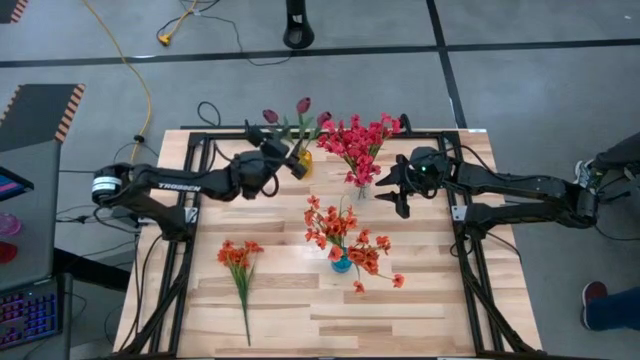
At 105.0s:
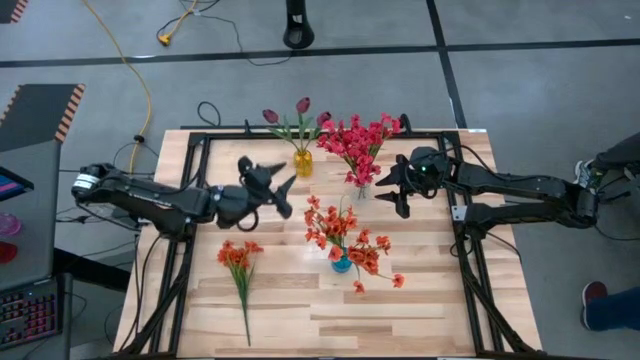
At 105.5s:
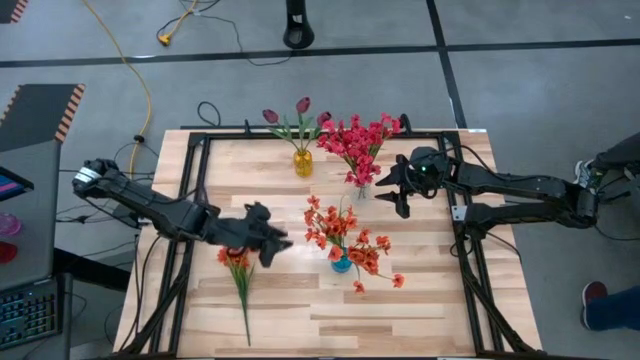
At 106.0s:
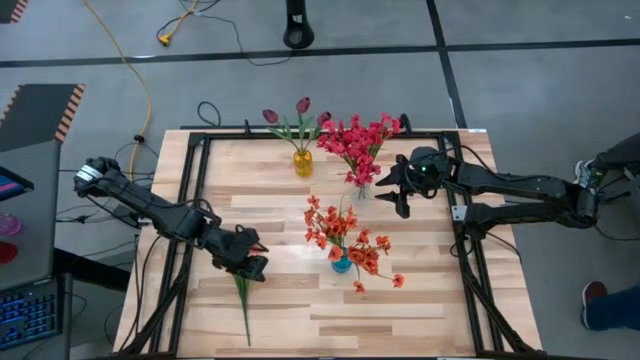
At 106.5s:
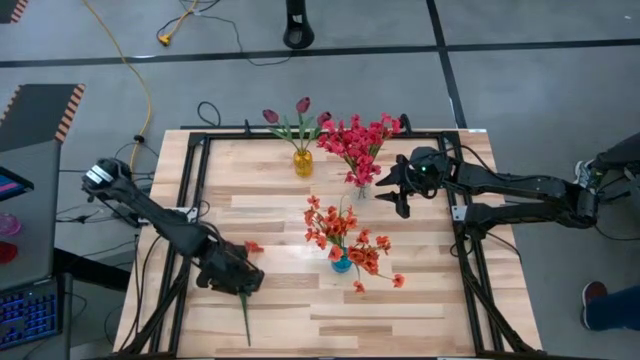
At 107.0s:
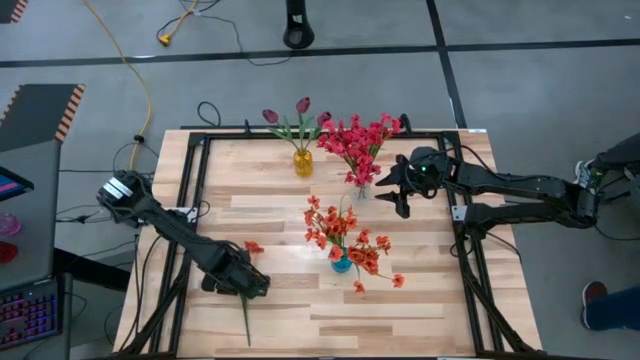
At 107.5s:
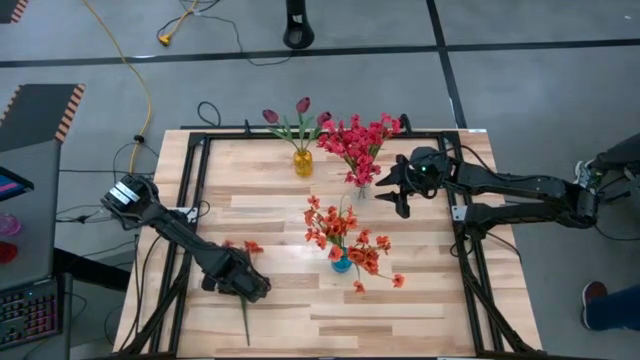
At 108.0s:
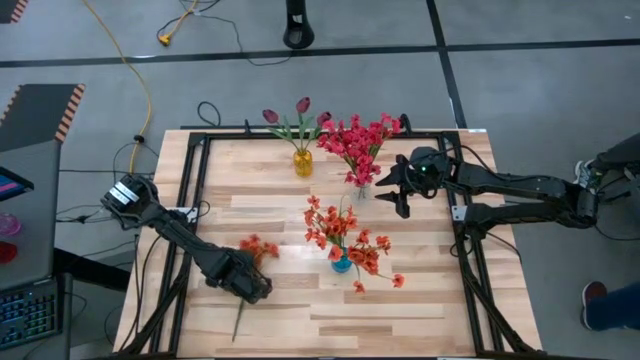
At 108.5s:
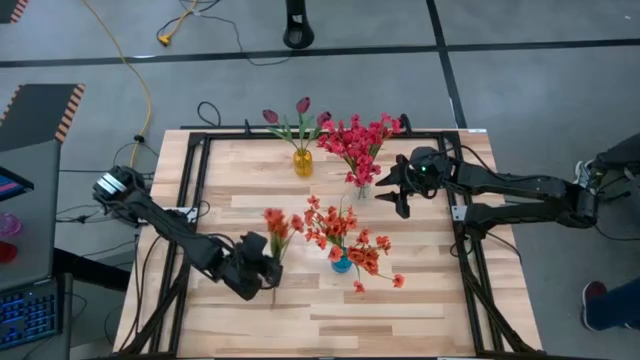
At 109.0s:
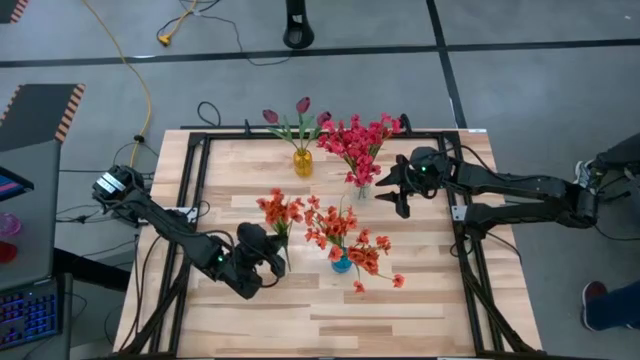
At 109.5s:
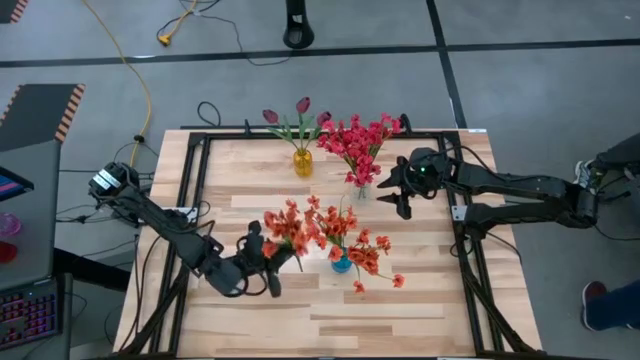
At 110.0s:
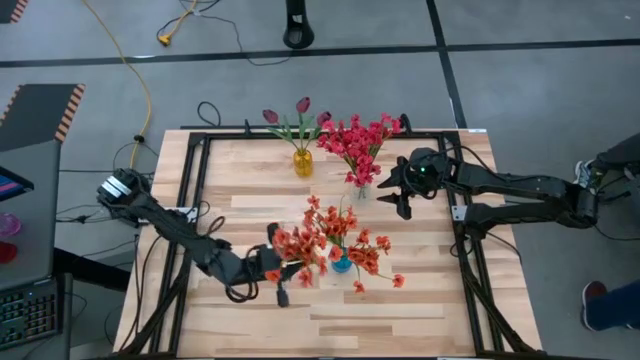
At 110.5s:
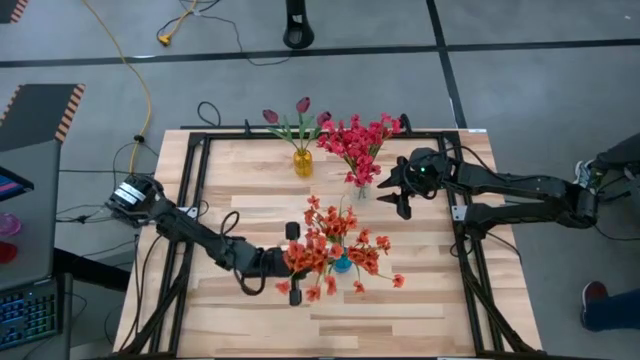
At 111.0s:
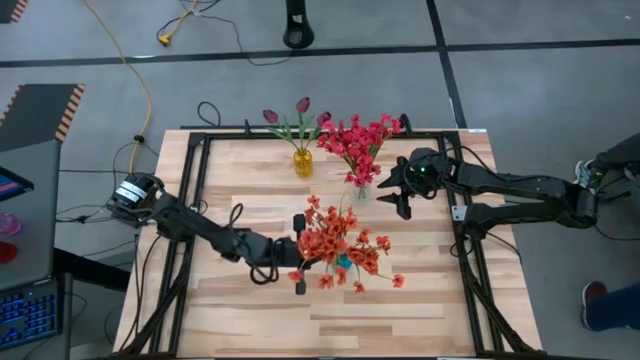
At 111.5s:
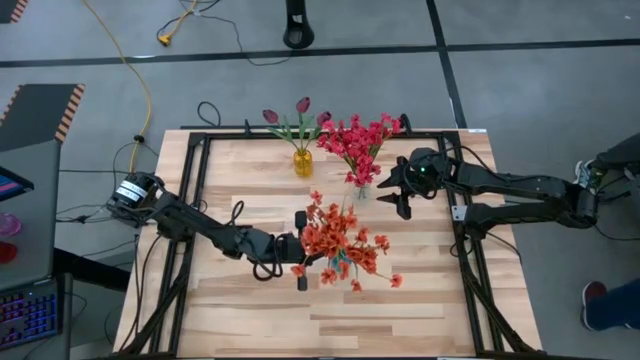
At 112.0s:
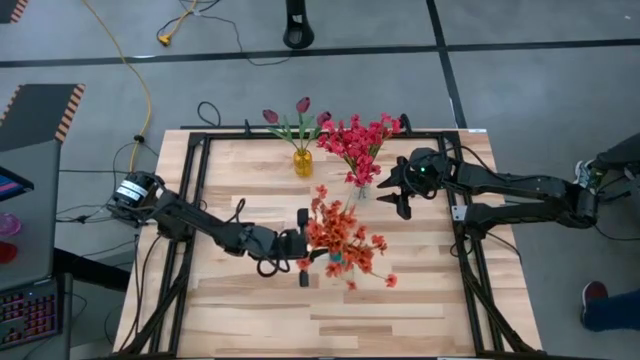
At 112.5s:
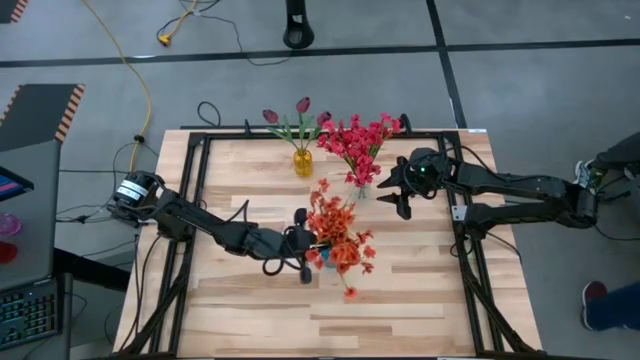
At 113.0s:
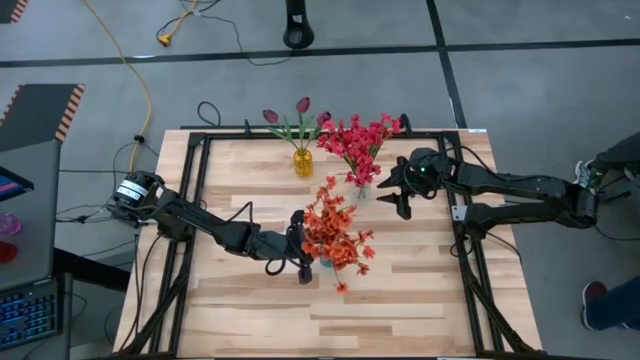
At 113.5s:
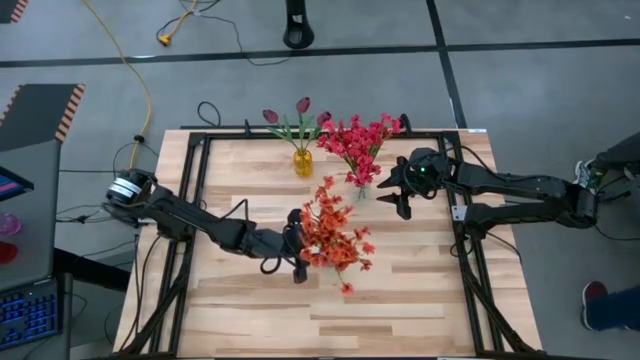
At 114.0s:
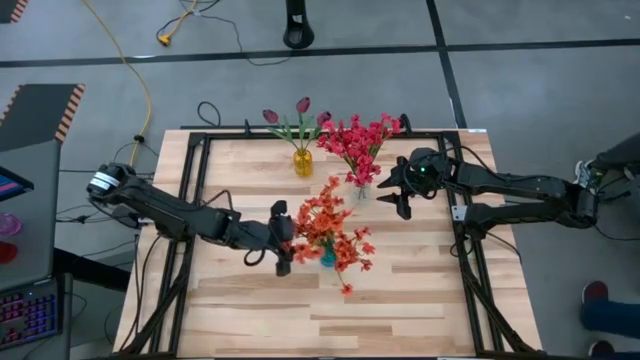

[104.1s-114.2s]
Task: Sort flowers into vase by color
Put the orange flowers into the blue vase

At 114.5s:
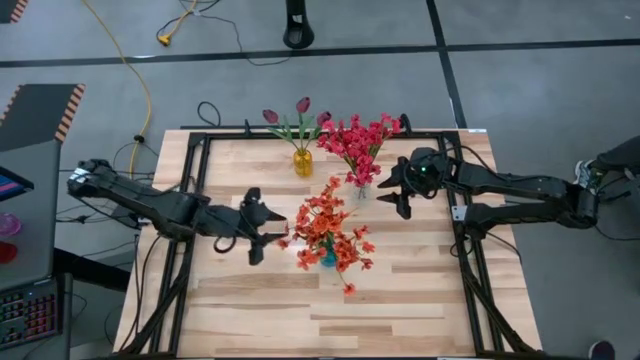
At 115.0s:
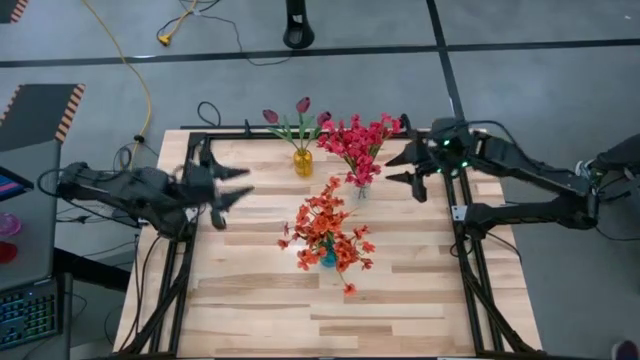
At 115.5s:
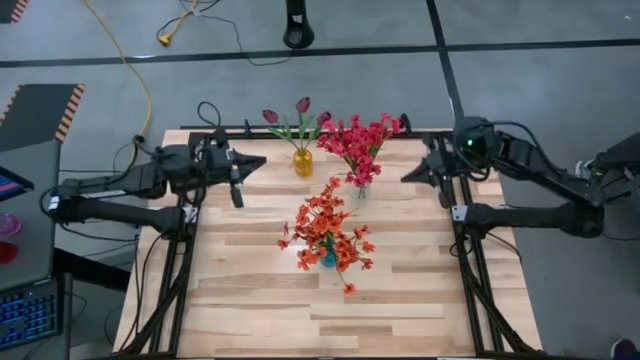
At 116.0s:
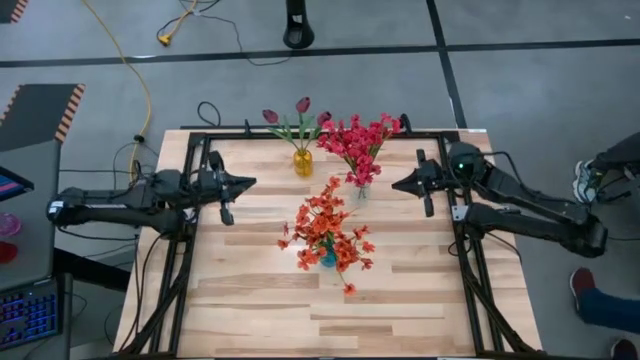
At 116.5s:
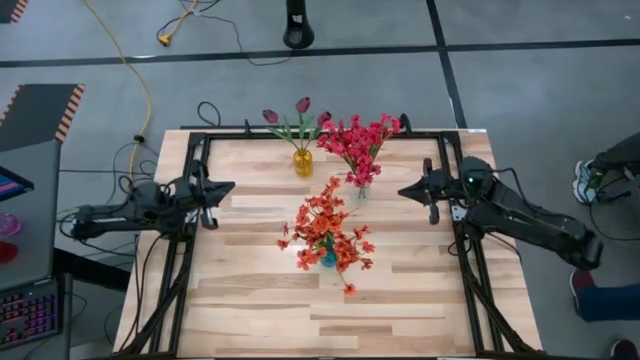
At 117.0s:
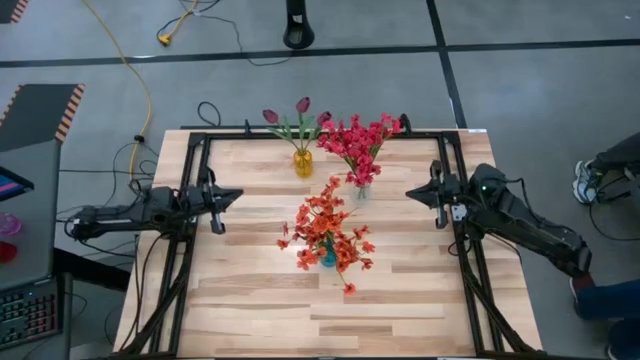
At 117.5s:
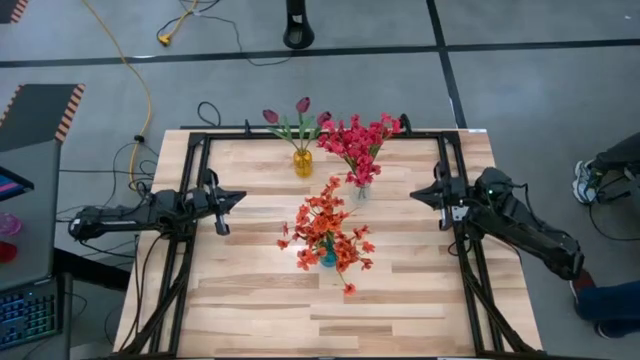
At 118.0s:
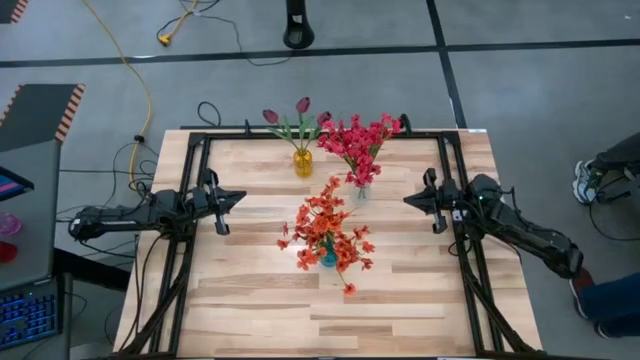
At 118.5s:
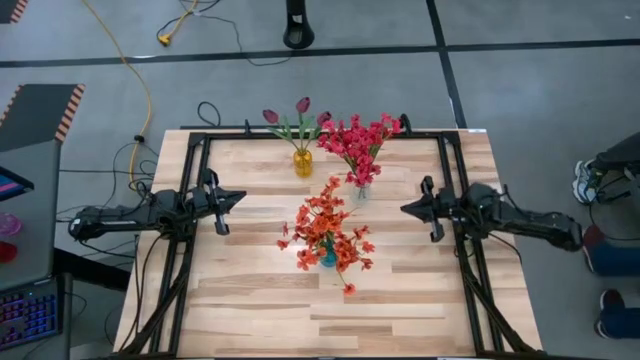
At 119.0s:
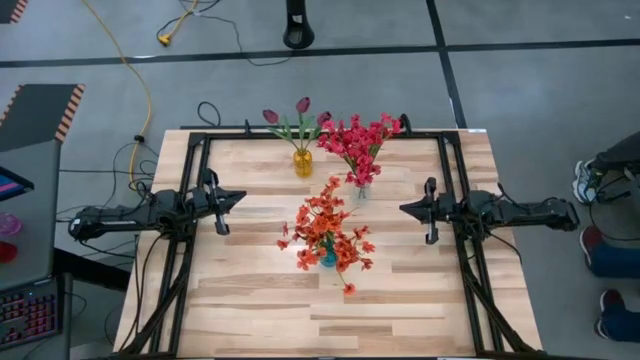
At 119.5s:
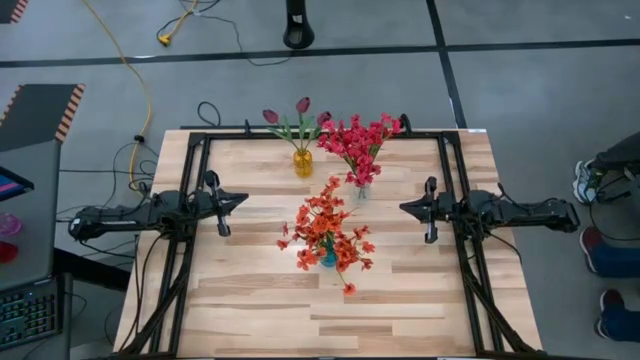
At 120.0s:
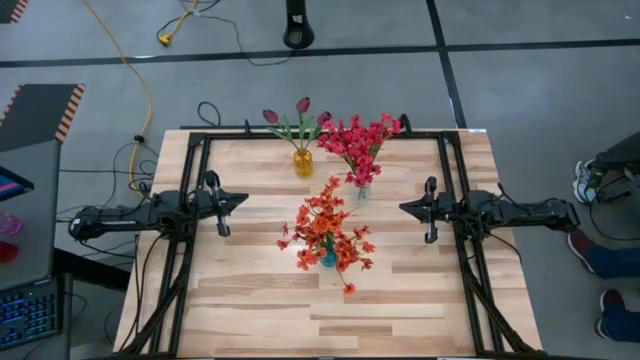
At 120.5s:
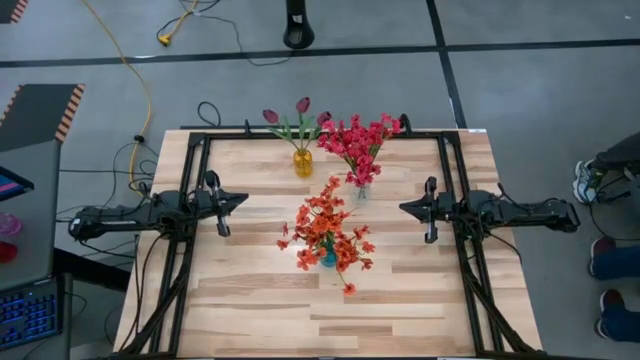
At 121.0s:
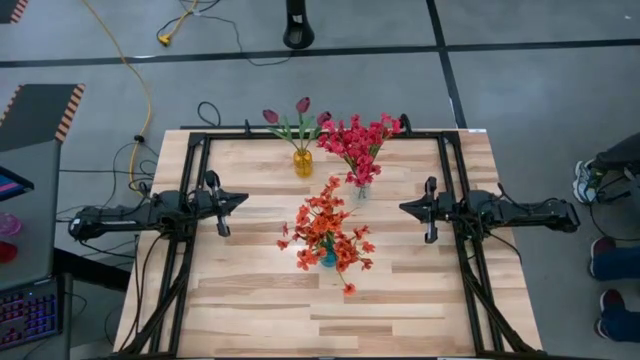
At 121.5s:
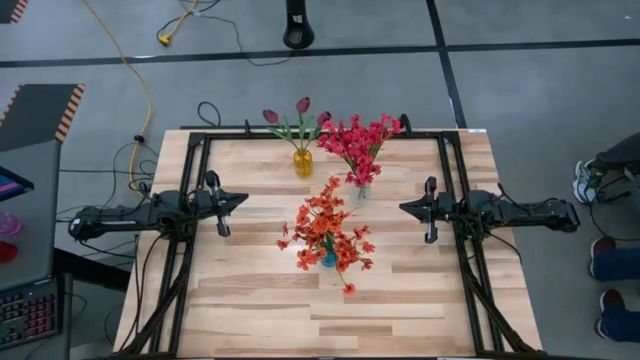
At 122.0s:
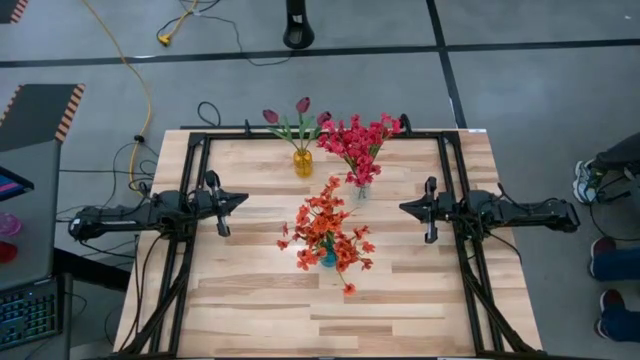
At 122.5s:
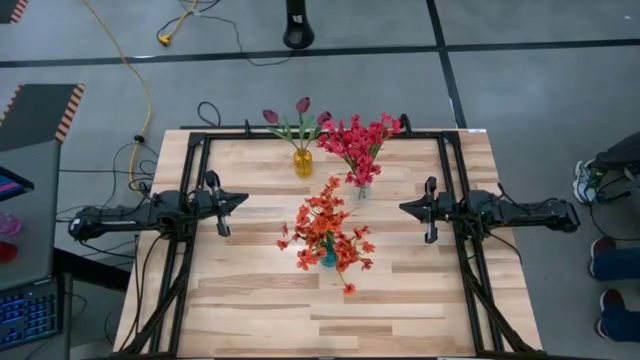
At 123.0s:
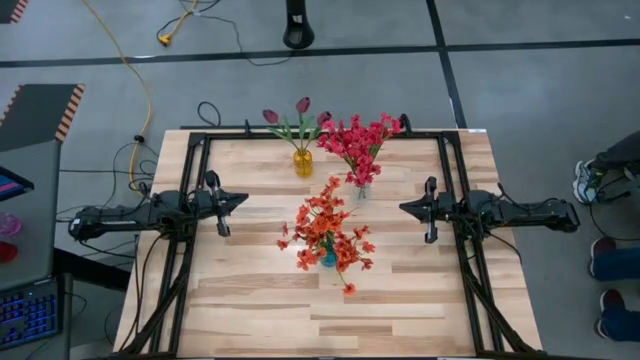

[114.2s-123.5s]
Return to Home Position
